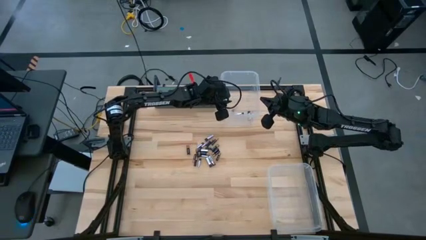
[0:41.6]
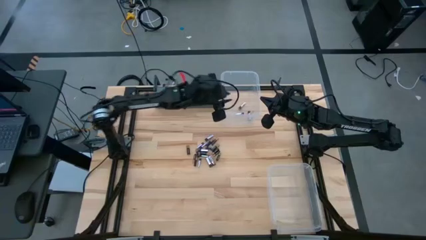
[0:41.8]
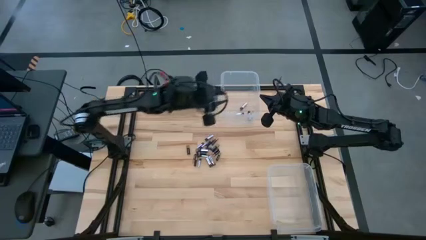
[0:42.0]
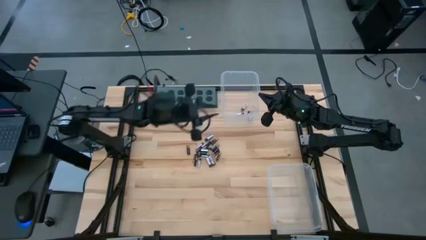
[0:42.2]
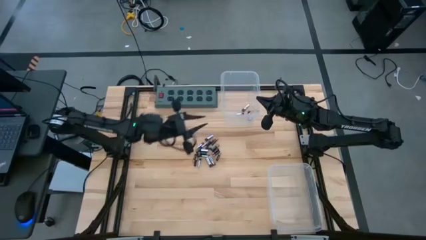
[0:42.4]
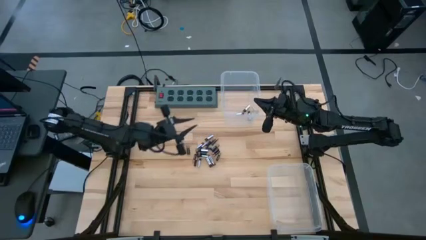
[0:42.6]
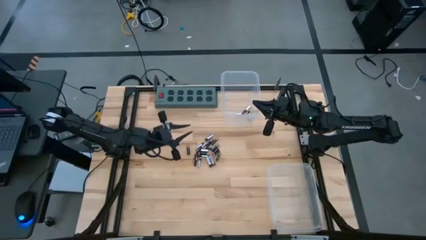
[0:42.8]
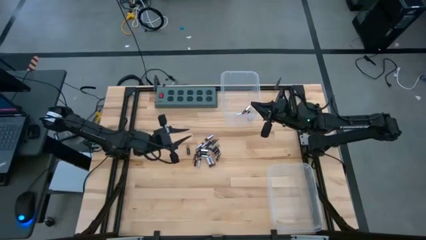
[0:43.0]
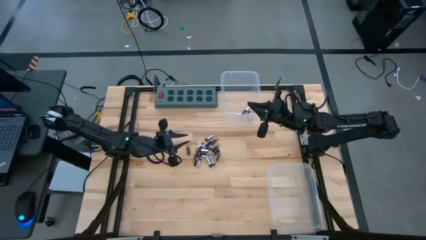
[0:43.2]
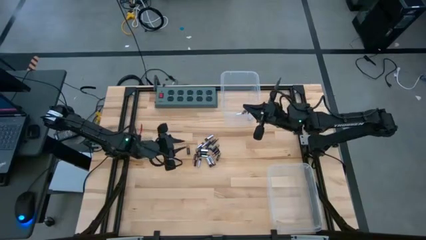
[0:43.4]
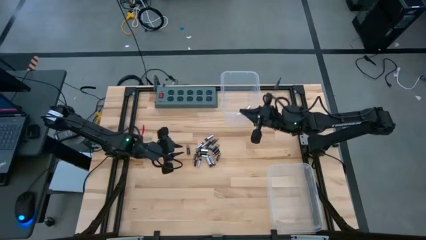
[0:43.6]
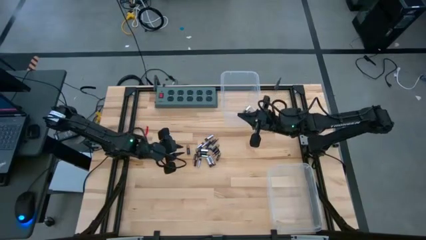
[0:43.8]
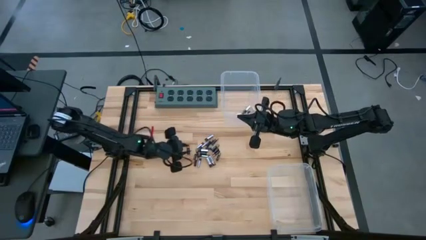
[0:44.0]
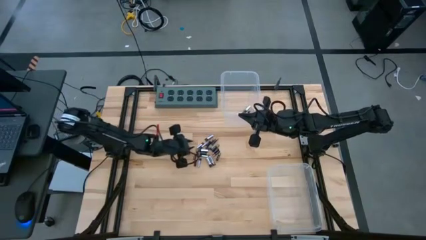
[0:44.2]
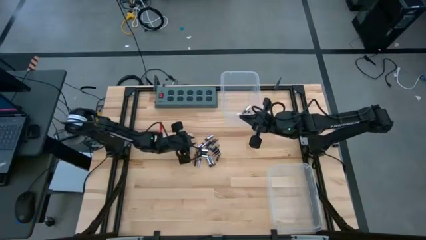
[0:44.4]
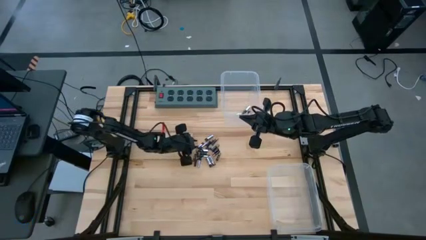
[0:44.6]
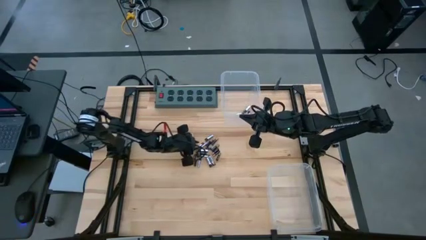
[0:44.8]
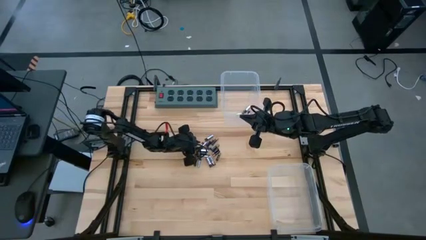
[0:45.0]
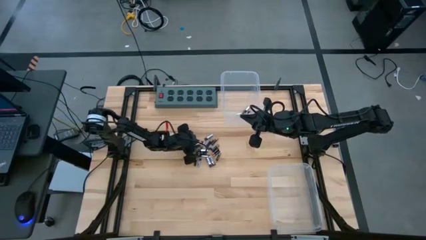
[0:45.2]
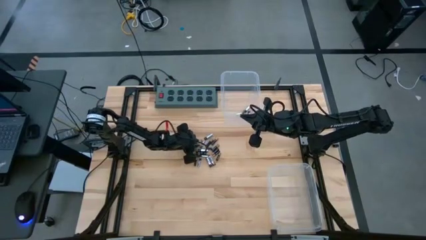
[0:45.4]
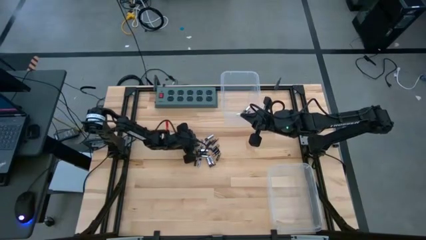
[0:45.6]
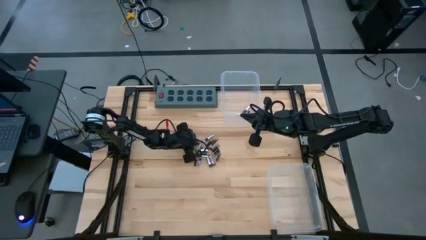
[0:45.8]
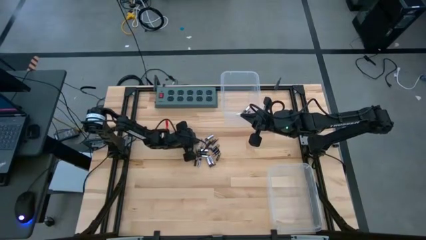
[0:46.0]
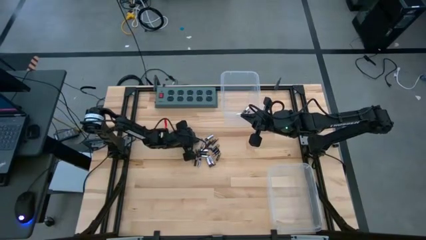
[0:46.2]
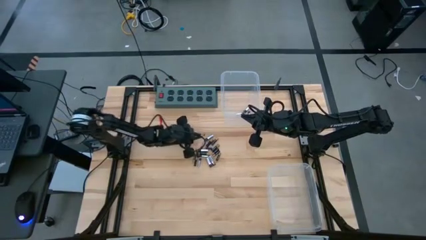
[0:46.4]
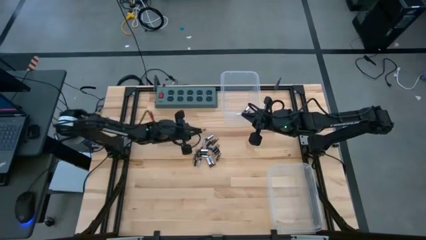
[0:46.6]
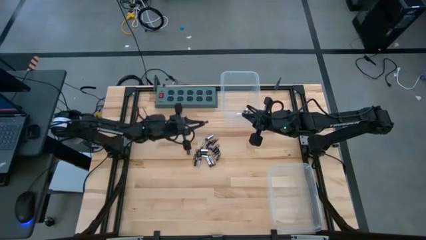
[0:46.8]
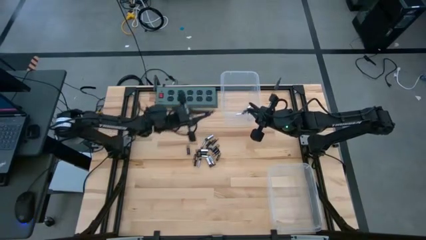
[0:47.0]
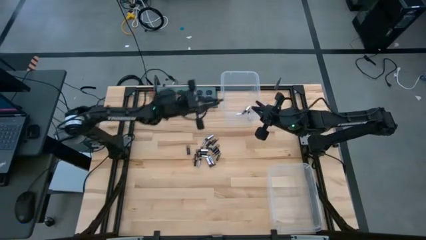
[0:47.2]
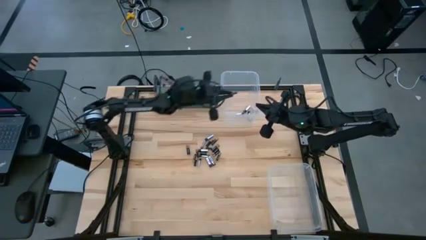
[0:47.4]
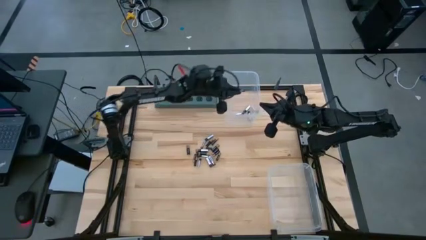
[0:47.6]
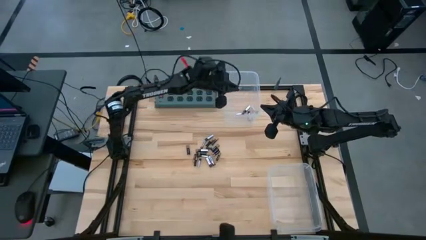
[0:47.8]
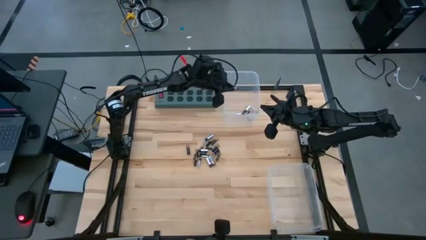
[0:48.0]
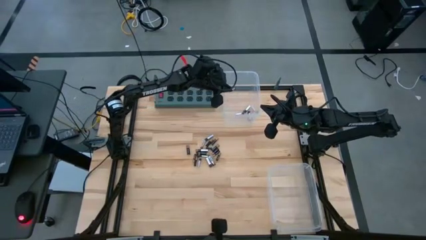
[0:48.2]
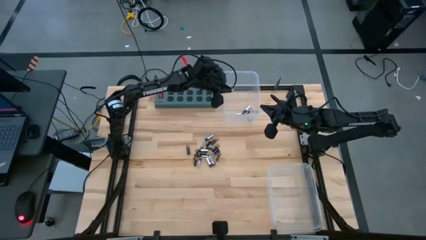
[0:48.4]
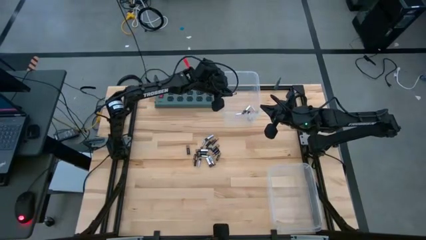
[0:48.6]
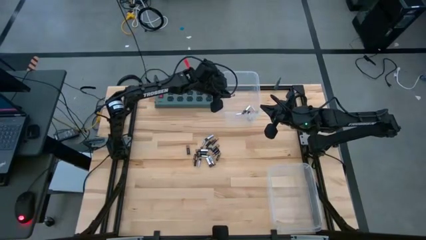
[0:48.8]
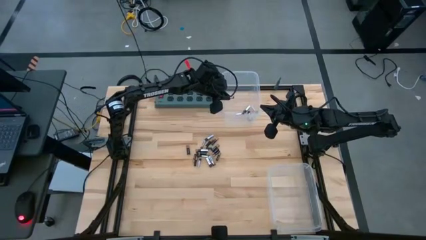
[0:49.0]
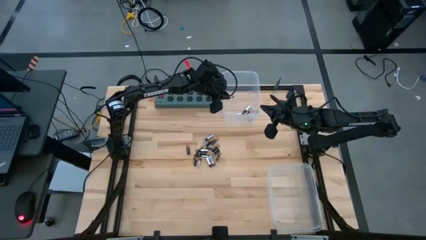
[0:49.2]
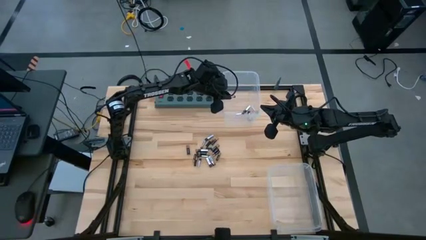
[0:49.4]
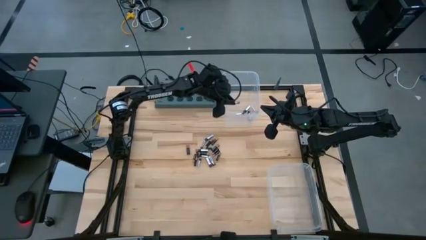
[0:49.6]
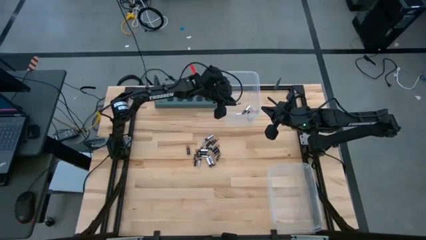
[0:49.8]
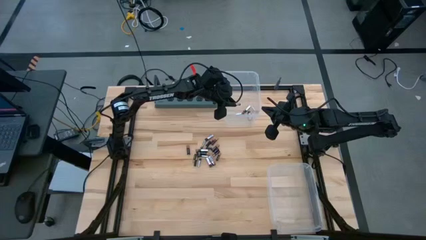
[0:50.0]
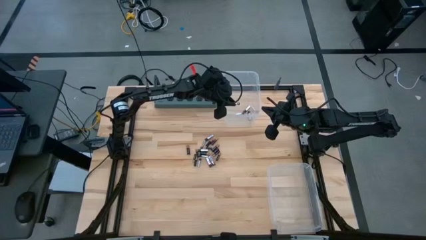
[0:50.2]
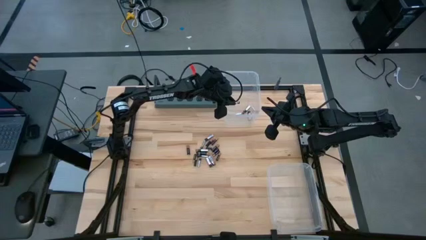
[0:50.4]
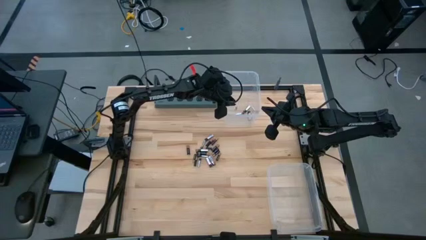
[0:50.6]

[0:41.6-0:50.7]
Task: Sort batteries
Put the silver battery into the top transparent bin

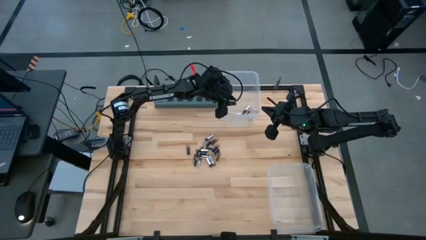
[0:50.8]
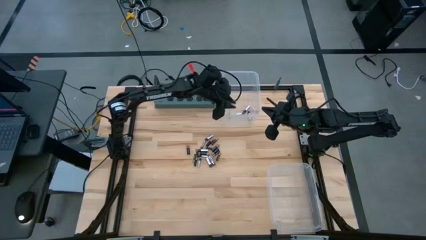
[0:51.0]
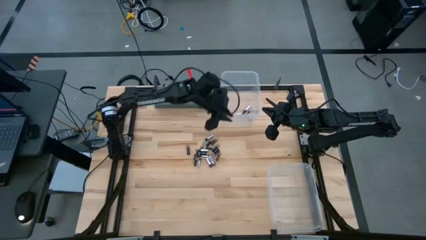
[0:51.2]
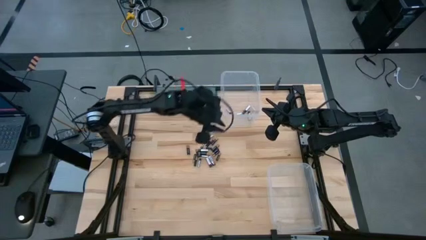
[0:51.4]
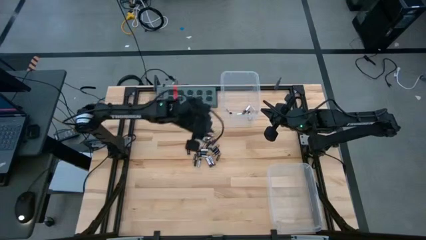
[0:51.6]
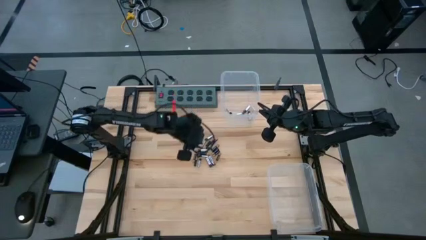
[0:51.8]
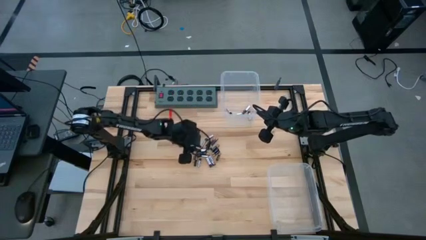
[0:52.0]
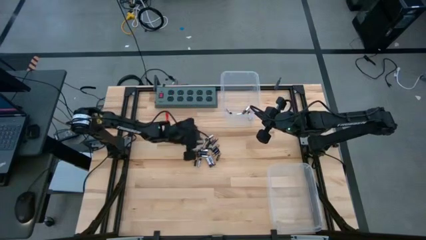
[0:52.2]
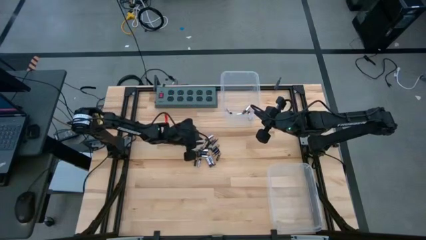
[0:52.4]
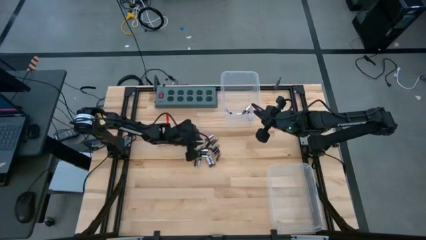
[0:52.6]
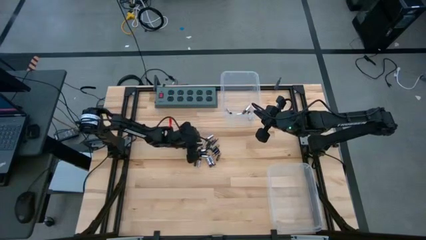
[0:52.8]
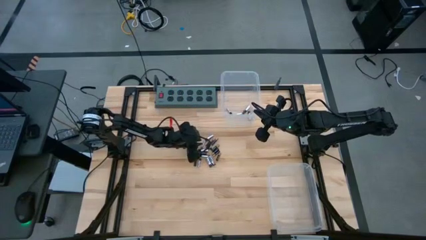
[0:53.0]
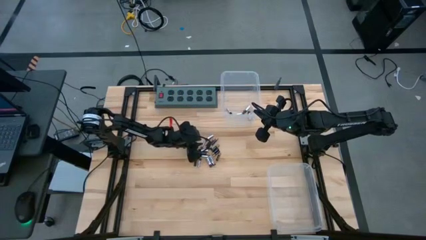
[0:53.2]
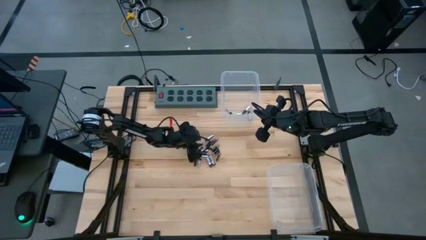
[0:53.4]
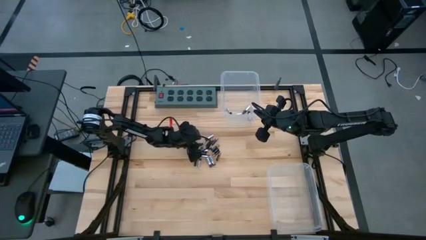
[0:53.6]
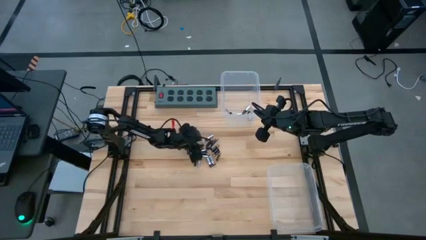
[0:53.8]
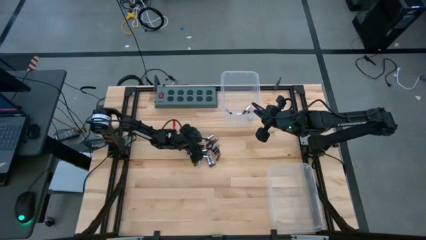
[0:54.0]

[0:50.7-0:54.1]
Put the silver battery into the top transparent bin

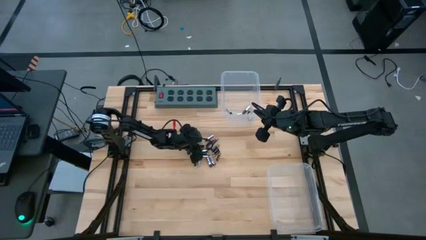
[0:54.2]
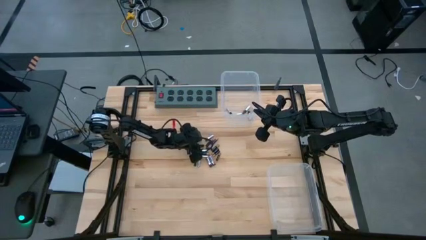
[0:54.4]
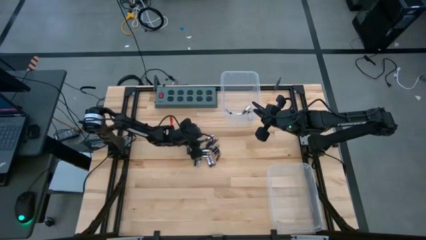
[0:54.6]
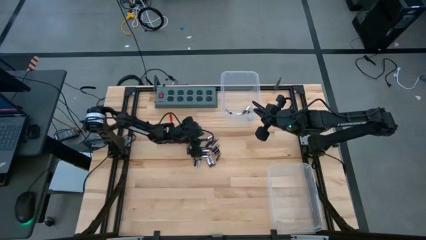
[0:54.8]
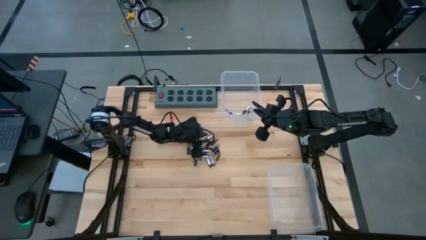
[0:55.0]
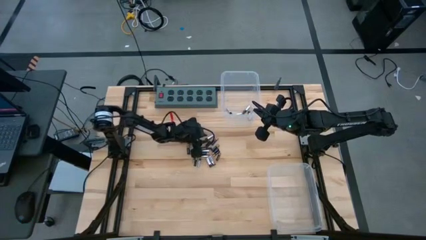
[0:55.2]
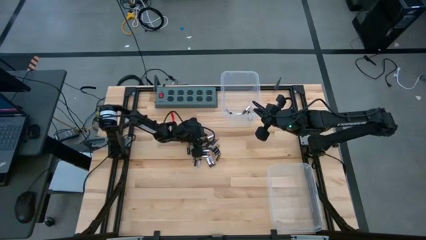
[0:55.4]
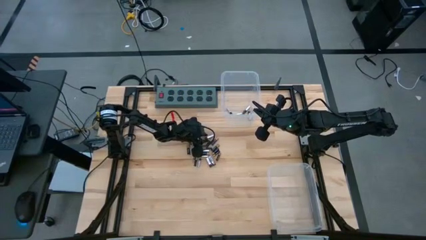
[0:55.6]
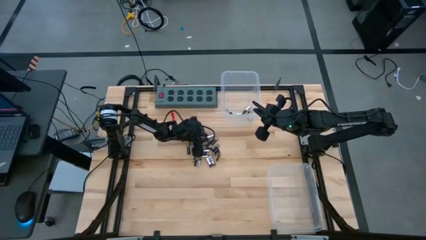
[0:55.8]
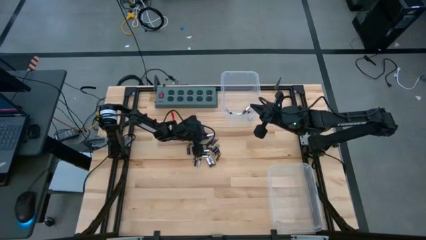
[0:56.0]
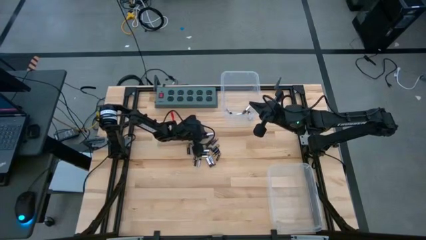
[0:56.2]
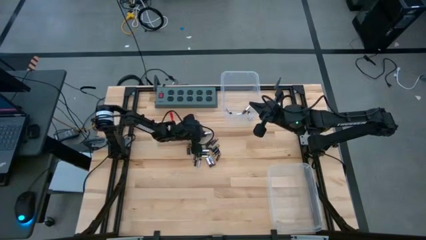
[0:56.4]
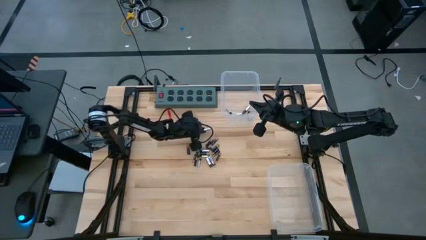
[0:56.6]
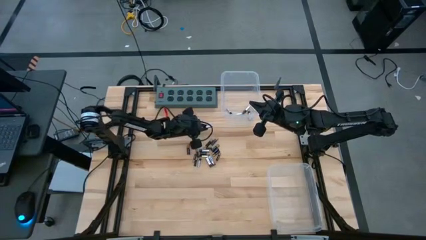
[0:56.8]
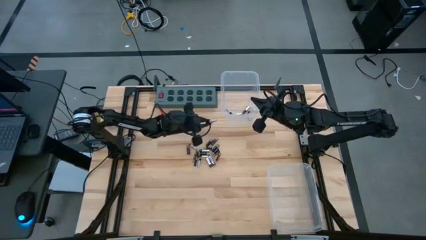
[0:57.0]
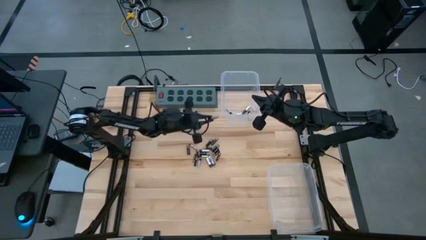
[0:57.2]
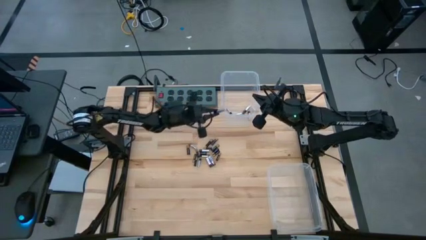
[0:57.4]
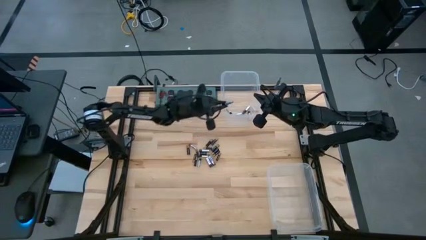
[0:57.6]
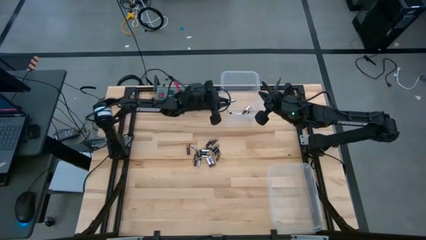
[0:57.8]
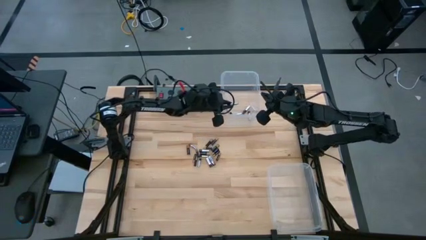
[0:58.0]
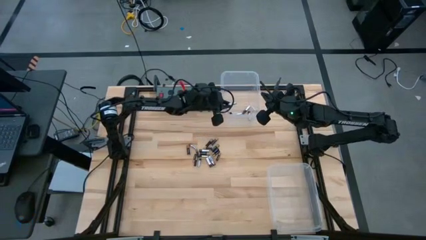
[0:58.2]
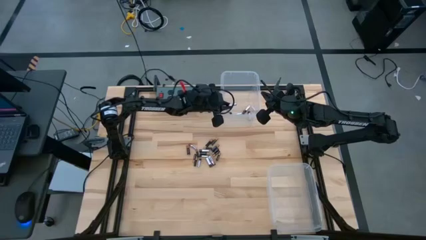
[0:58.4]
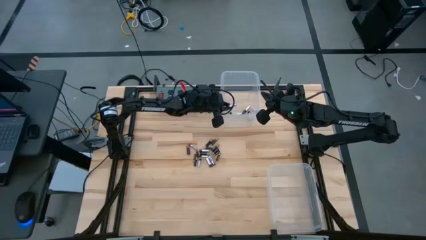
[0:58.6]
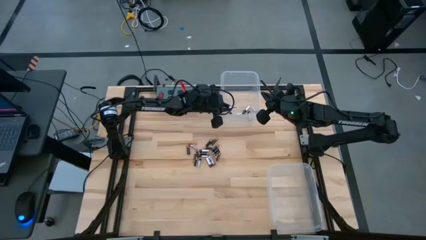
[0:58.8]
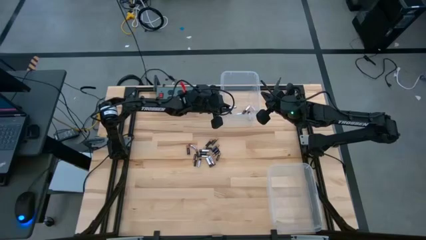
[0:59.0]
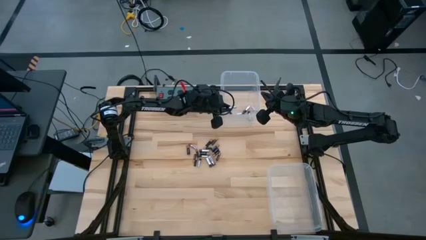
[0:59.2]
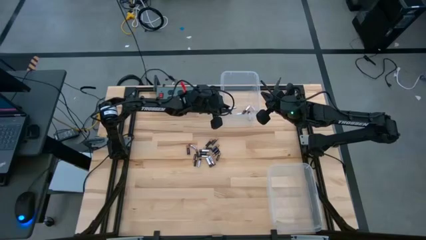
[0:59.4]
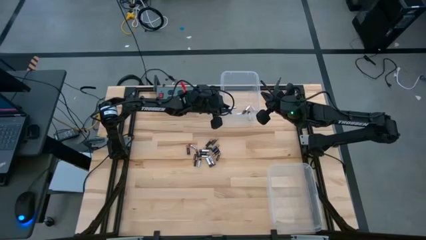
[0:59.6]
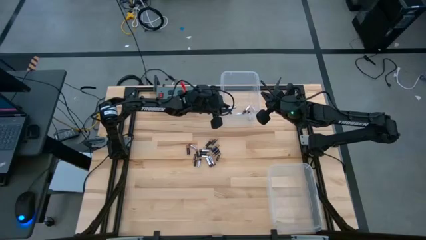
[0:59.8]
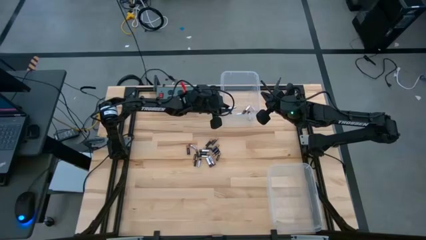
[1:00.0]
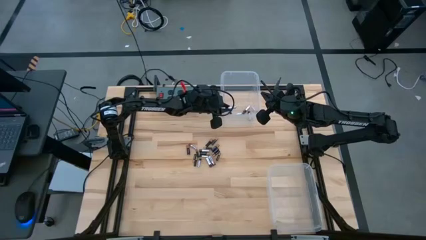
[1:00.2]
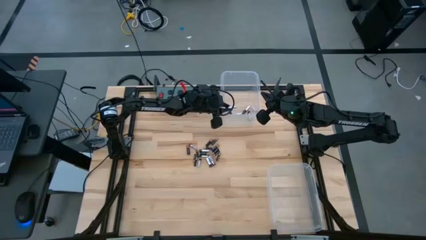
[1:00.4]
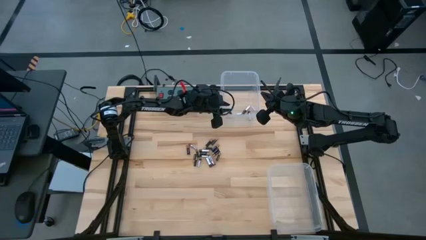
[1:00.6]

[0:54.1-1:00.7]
Put the silver battery into the top transparent bin
